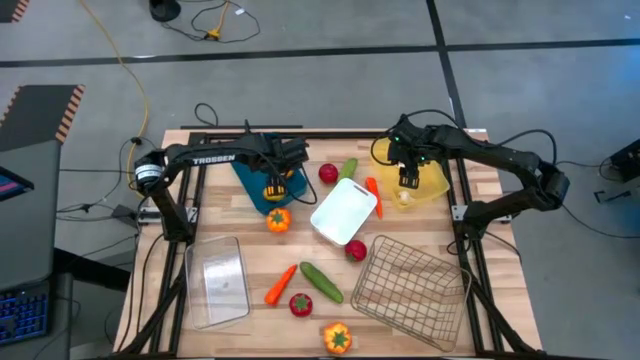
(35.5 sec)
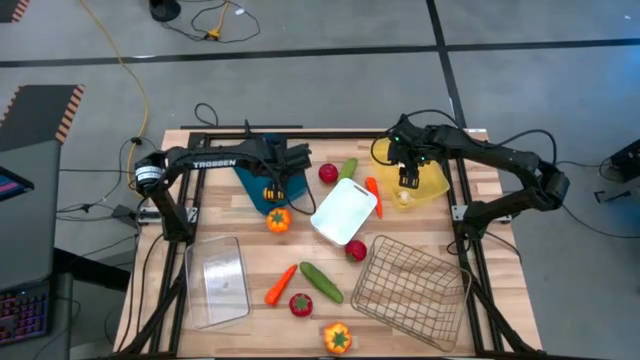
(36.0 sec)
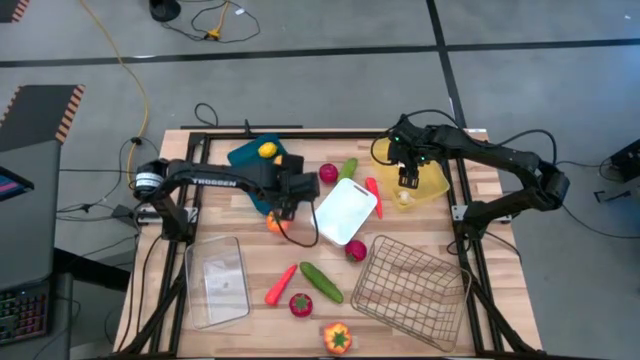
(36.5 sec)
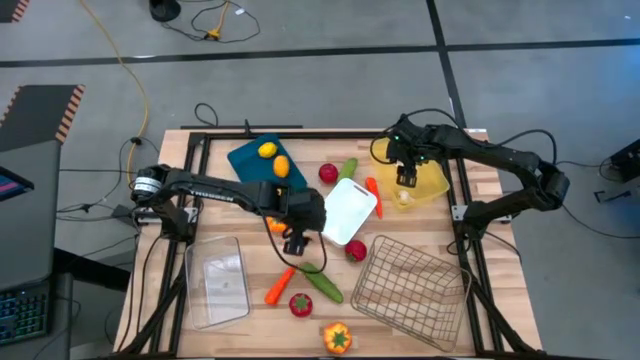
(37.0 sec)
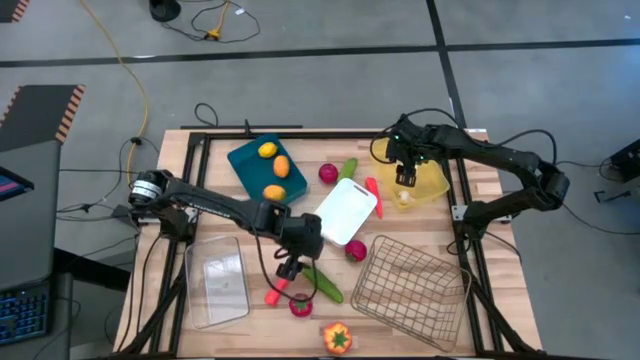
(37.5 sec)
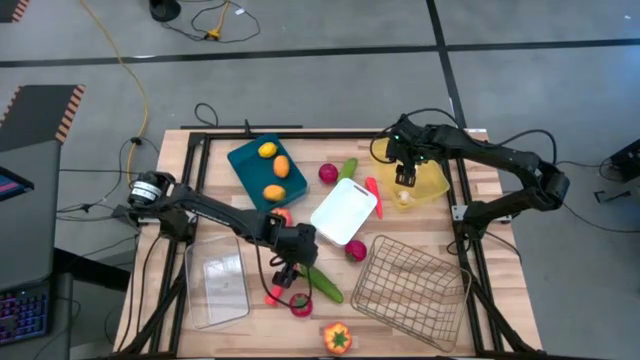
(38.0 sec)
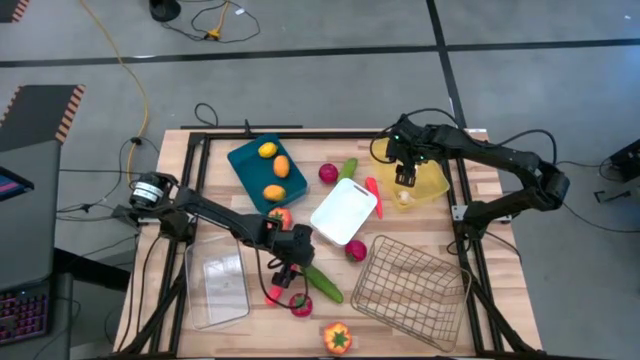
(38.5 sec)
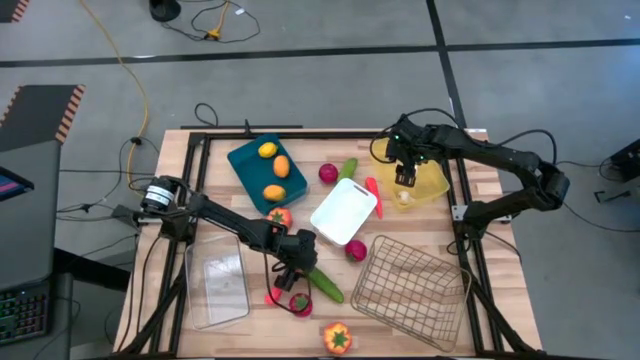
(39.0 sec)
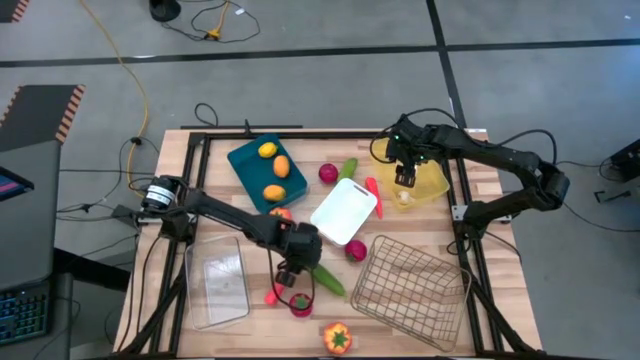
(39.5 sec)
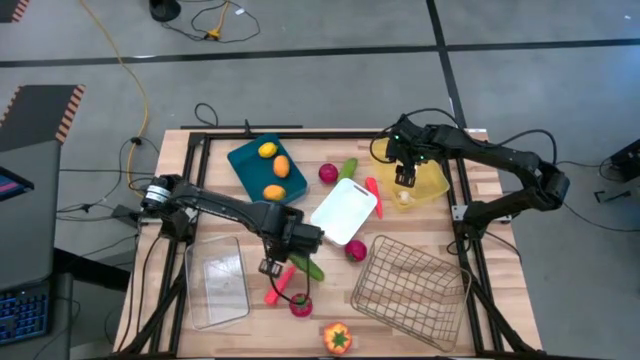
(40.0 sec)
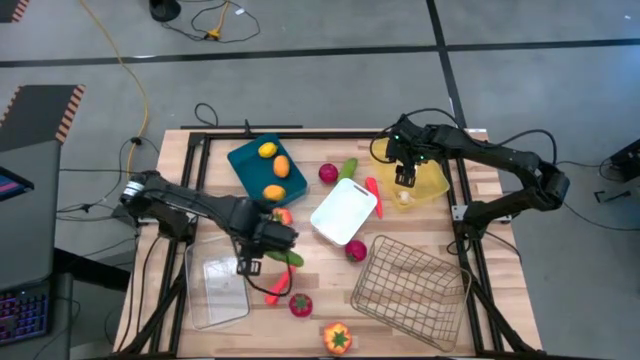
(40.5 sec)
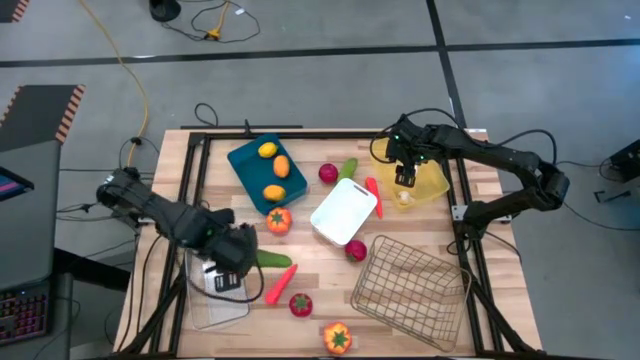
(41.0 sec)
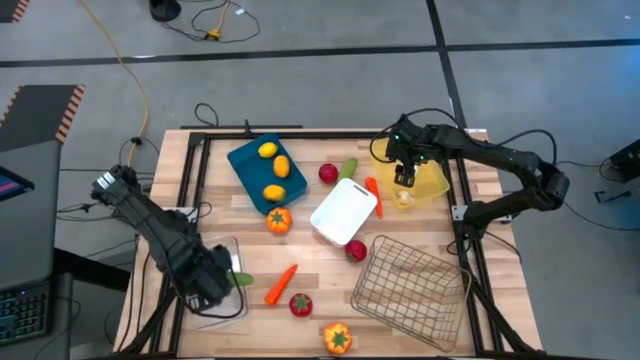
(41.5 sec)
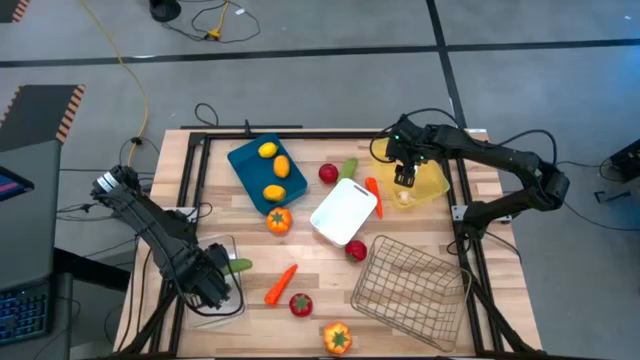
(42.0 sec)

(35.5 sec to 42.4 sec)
Task: Sort produce into baskets
Put the bottom green cucumber into the transparent bin

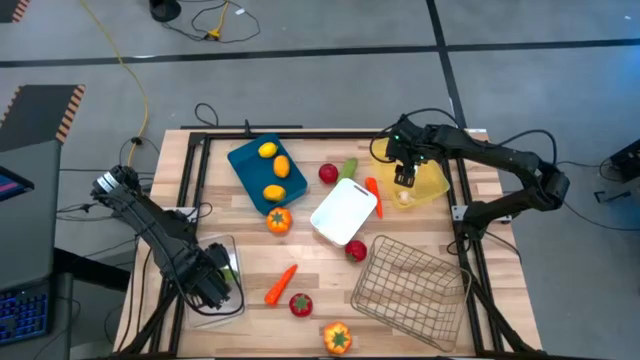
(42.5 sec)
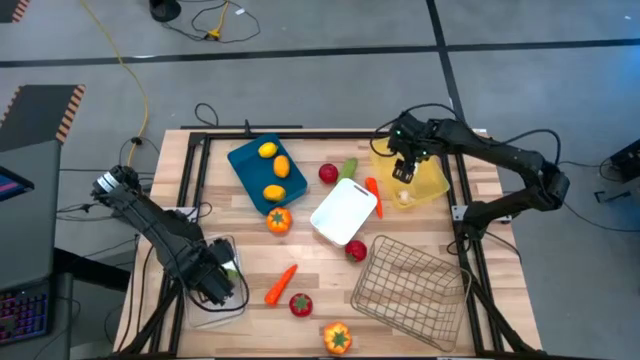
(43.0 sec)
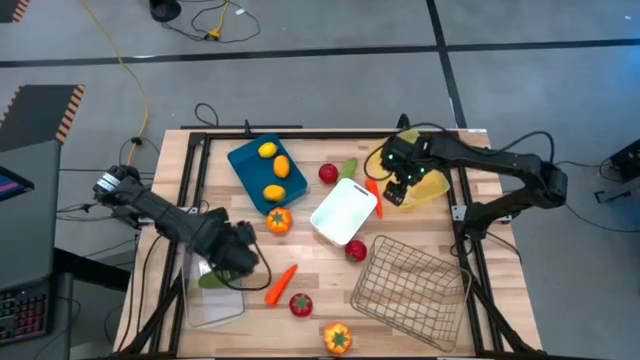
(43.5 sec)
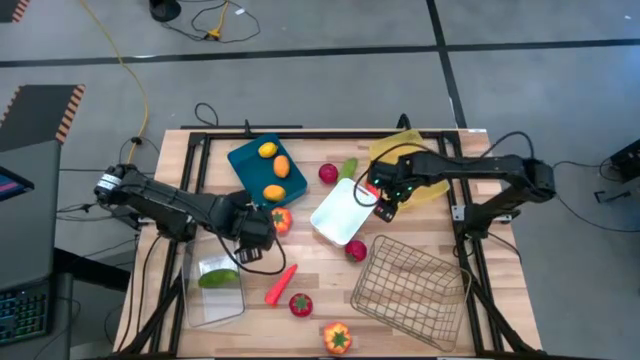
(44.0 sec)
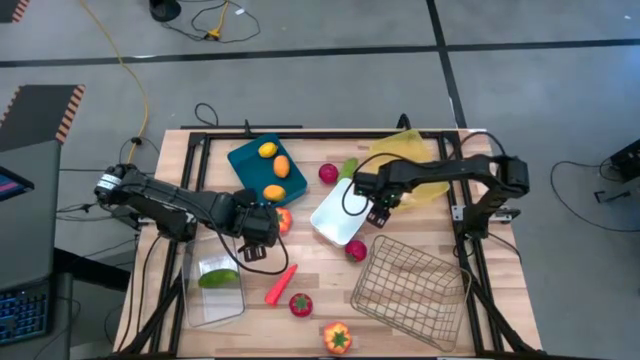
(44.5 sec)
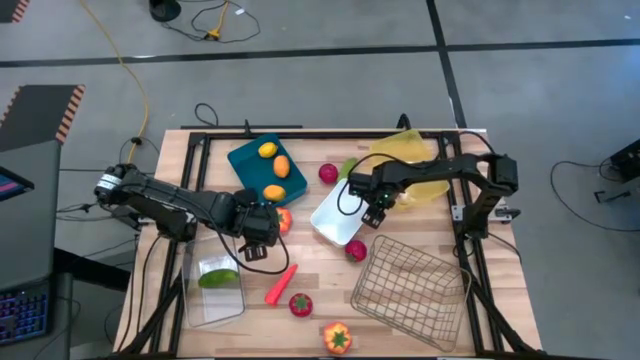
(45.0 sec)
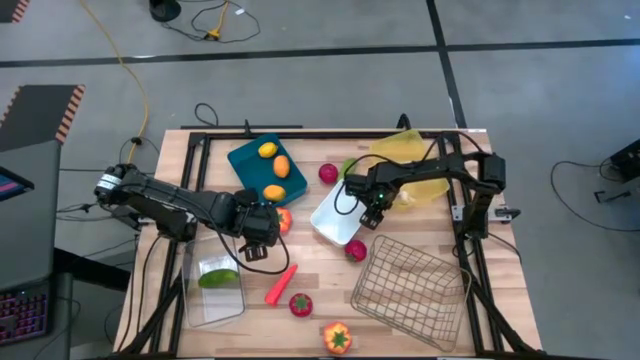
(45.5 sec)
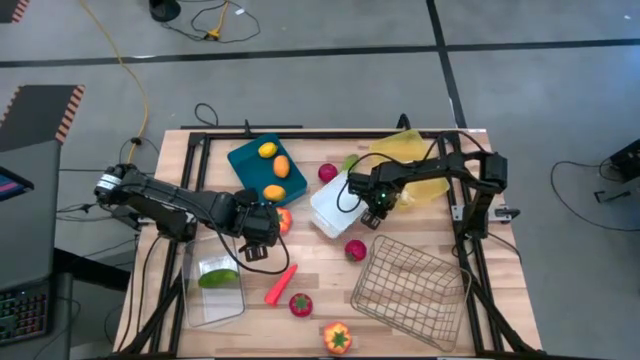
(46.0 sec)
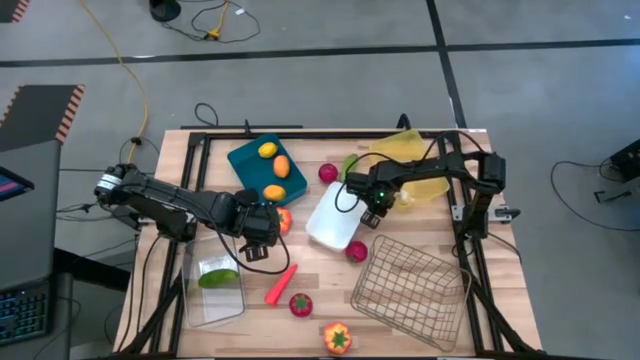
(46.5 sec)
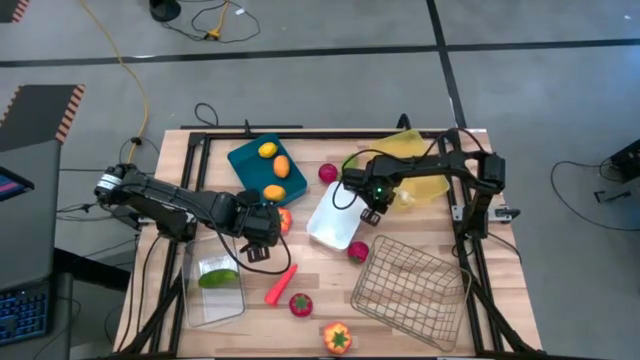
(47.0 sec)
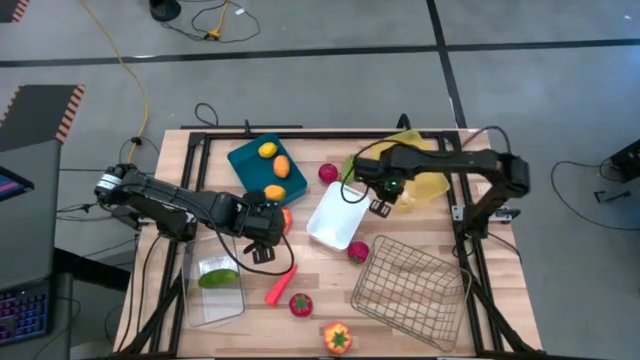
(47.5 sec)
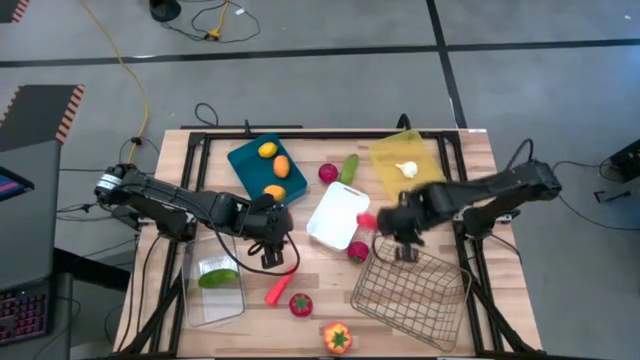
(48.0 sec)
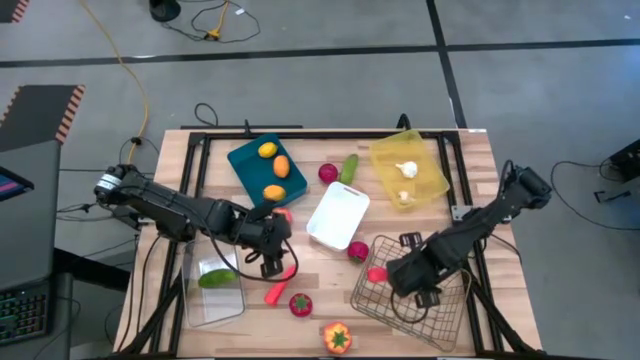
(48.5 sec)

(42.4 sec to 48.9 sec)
Put the right orange carrot into the wire basket

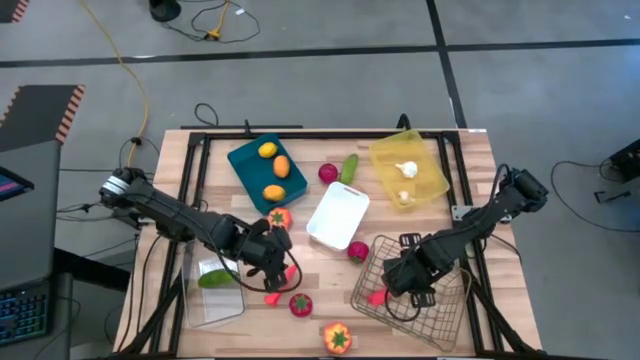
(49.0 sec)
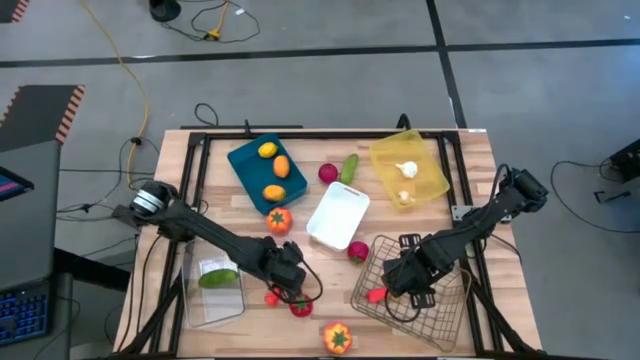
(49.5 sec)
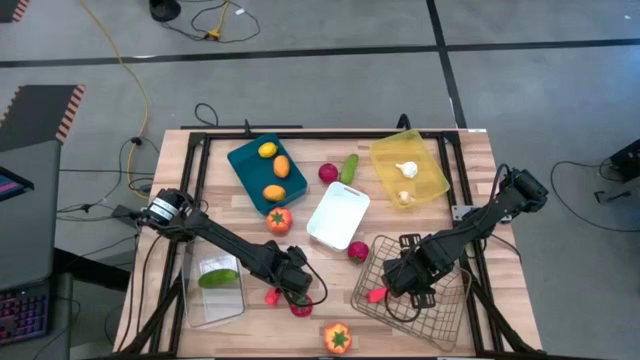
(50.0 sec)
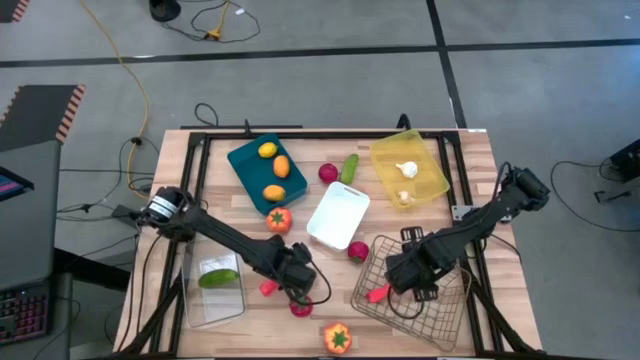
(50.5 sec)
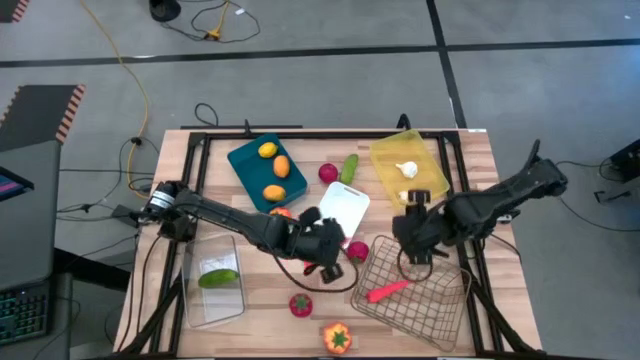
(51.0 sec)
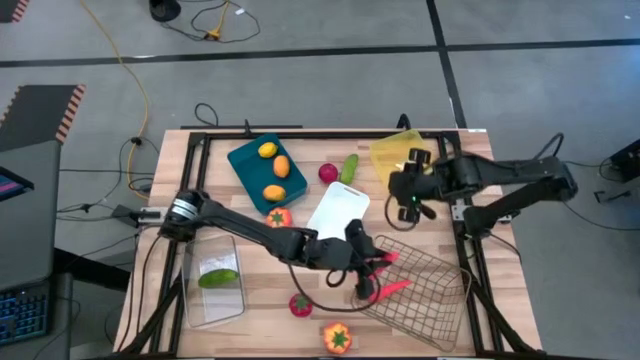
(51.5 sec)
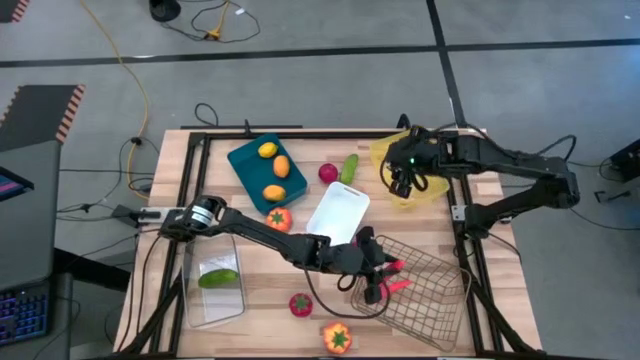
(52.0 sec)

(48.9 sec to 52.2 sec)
Put the orange carrot into the wire basket

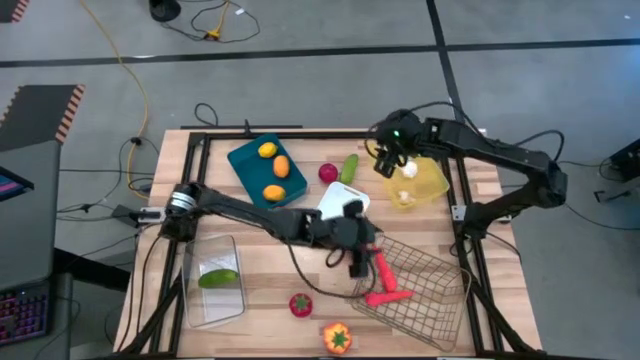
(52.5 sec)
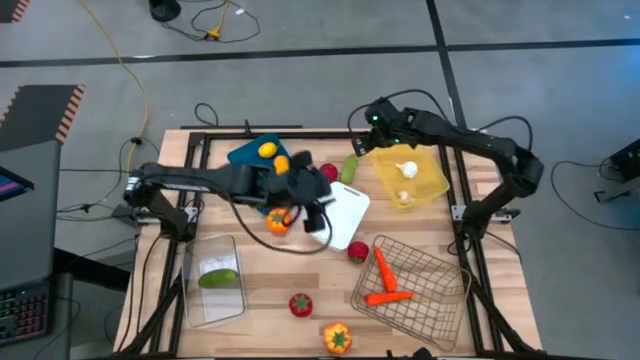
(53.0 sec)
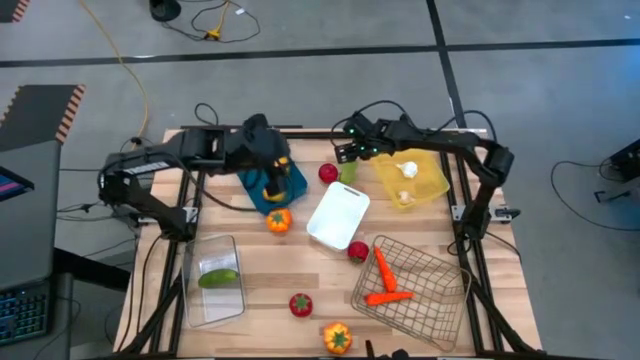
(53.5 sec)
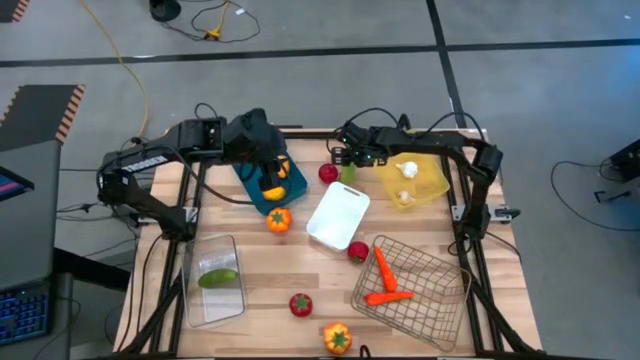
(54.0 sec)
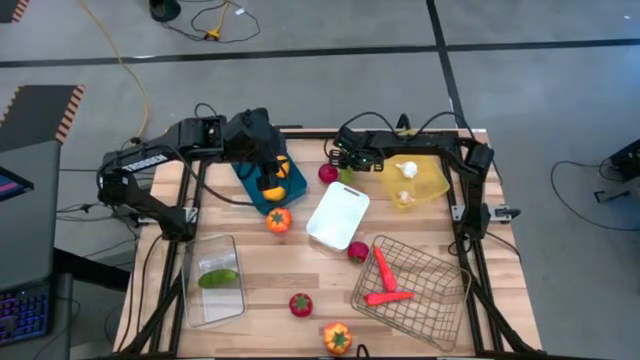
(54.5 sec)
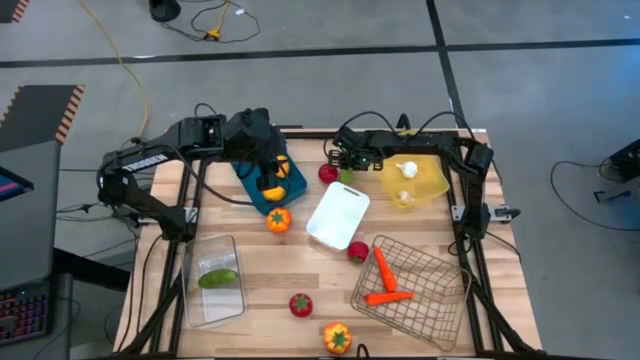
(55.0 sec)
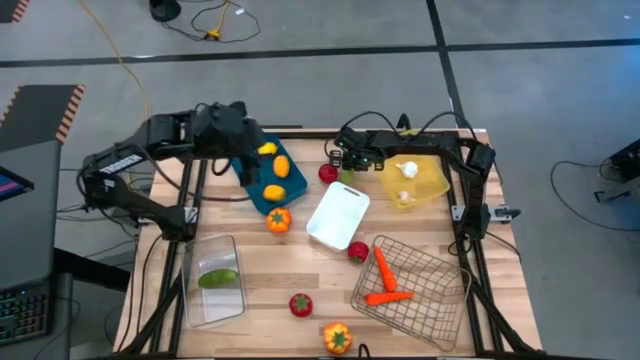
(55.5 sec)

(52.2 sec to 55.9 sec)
Put the green cucumber into the transparent bin

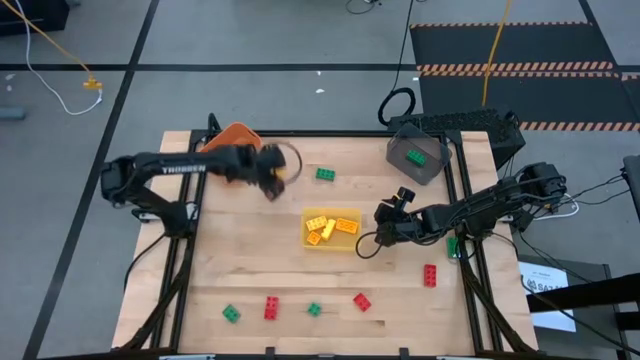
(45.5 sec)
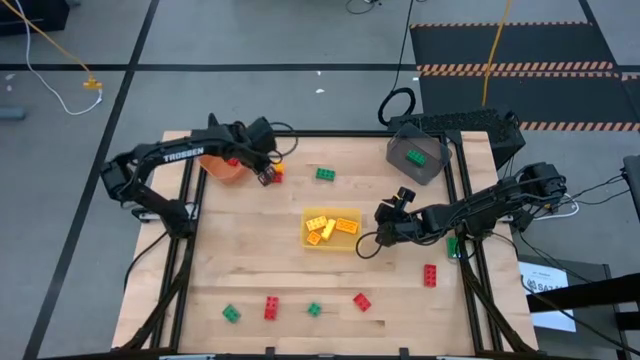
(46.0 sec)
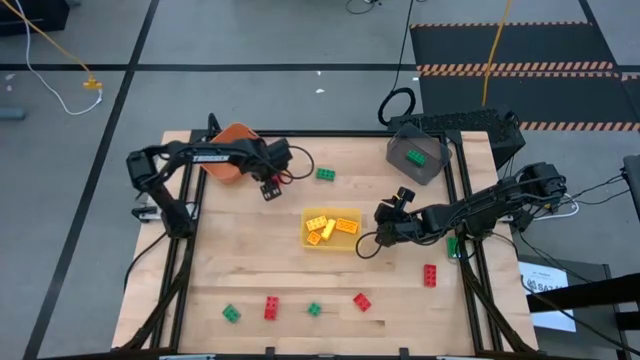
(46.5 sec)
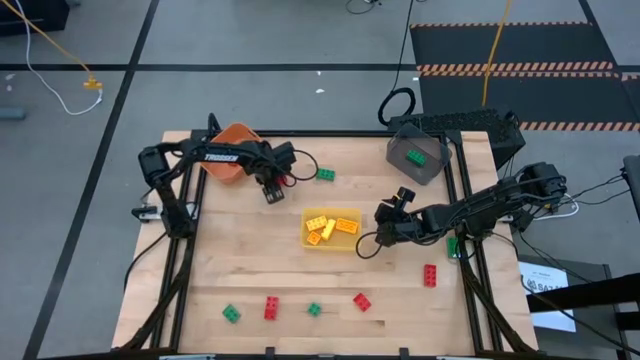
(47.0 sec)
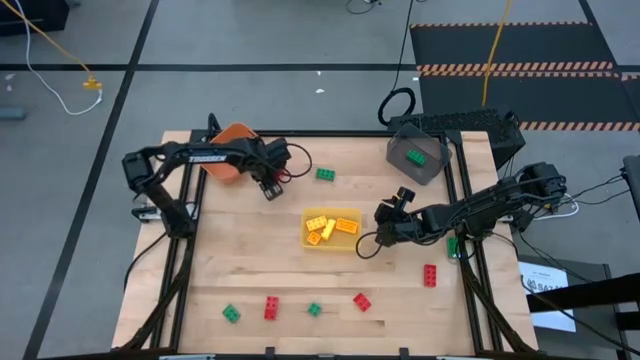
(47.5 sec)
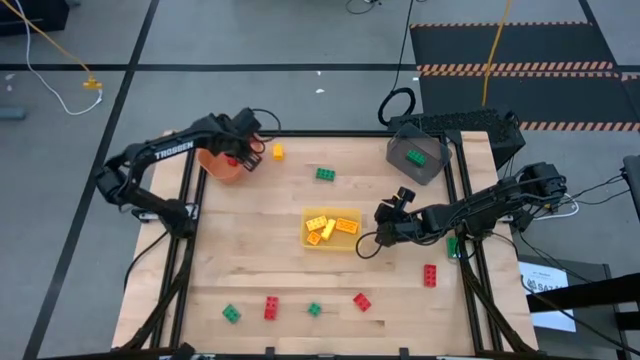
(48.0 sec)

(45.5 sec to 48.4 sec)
Task: Sort & place blocks by color
Put the top left red 8-stud game piece into the orange bin
